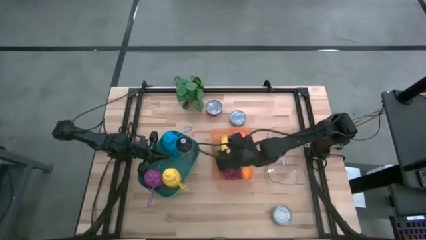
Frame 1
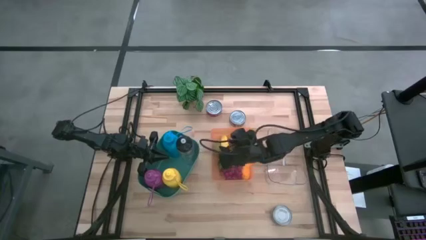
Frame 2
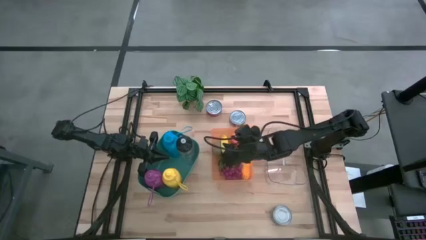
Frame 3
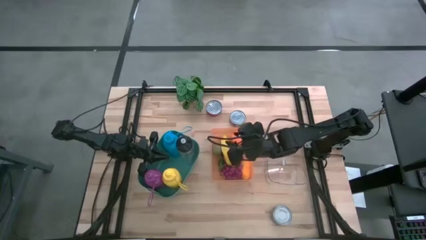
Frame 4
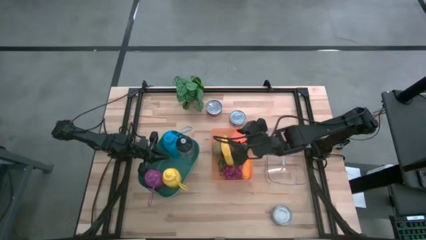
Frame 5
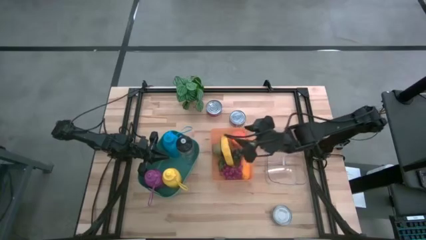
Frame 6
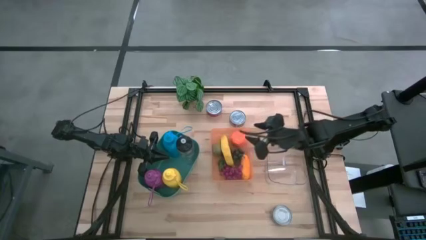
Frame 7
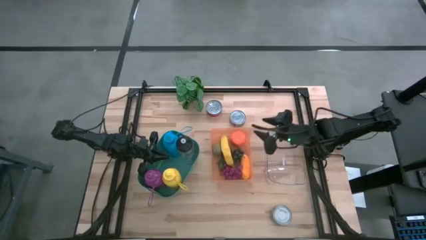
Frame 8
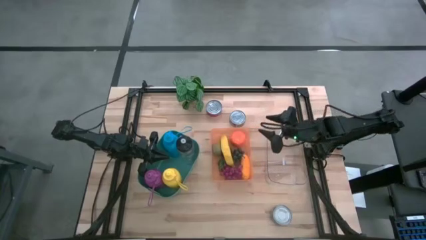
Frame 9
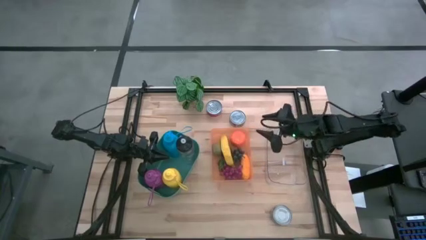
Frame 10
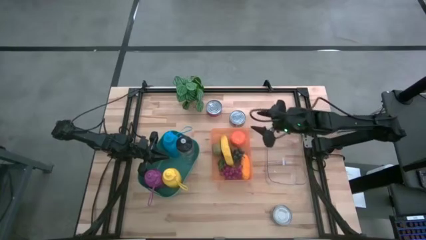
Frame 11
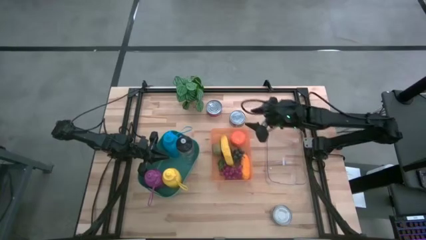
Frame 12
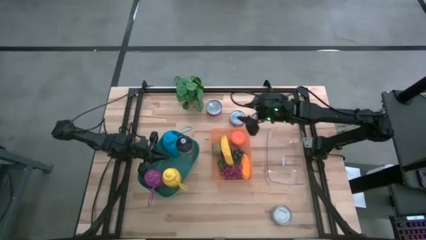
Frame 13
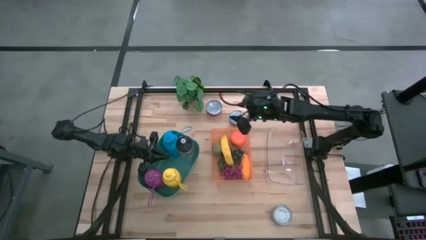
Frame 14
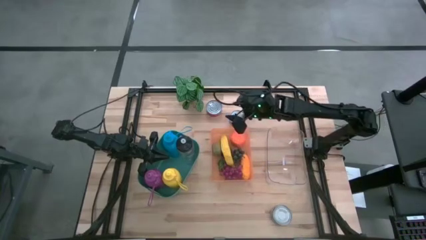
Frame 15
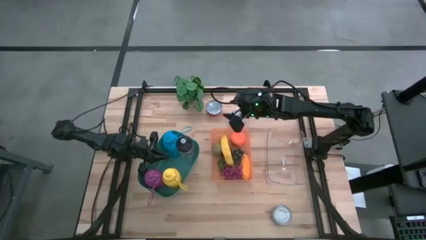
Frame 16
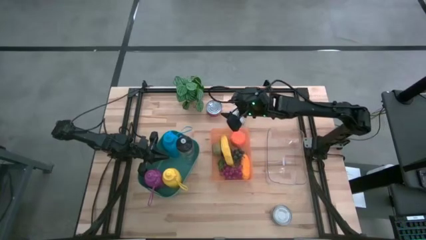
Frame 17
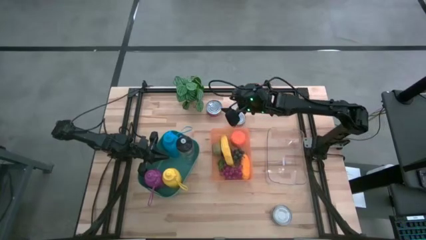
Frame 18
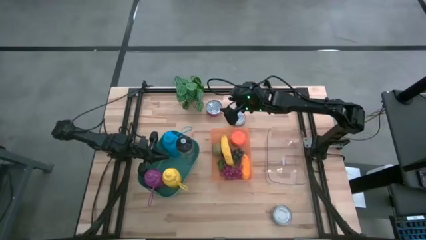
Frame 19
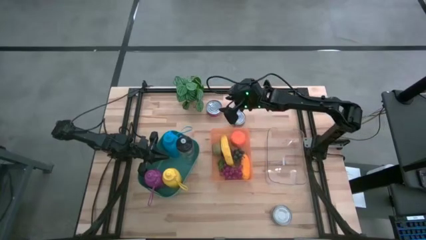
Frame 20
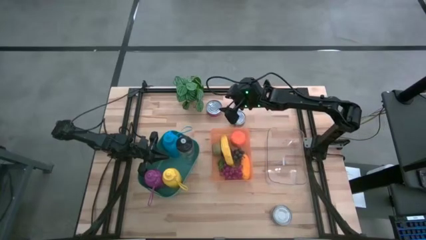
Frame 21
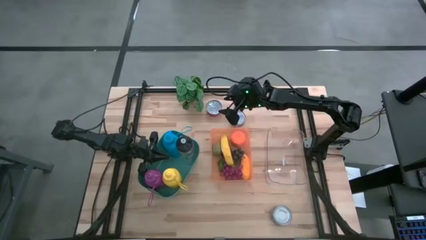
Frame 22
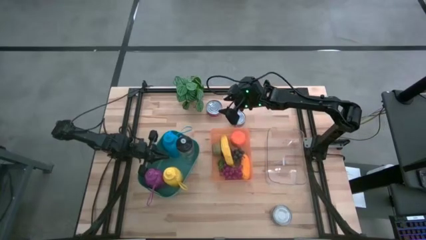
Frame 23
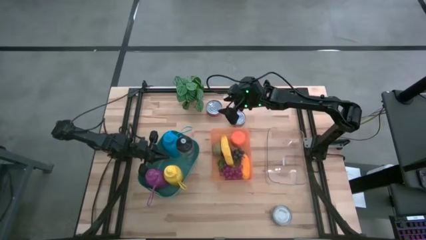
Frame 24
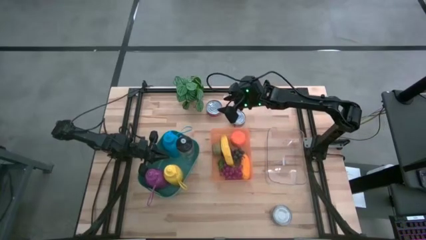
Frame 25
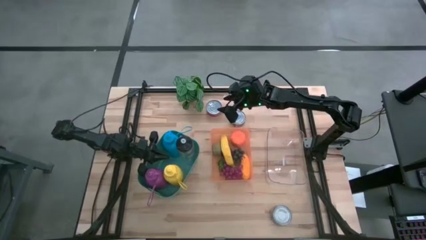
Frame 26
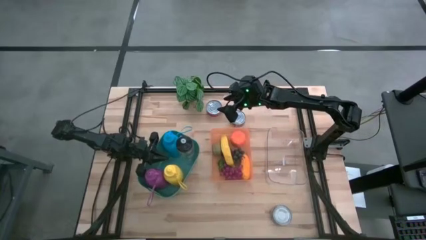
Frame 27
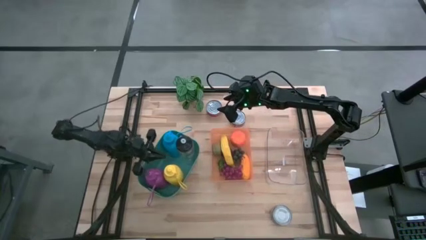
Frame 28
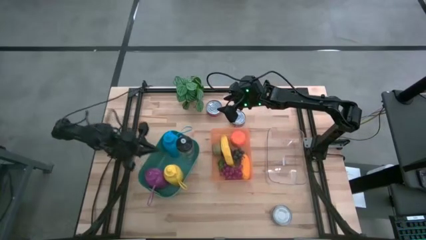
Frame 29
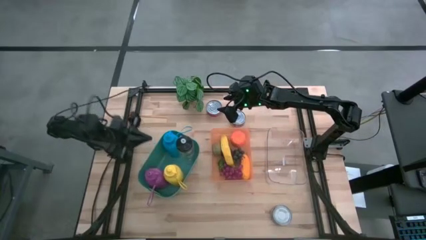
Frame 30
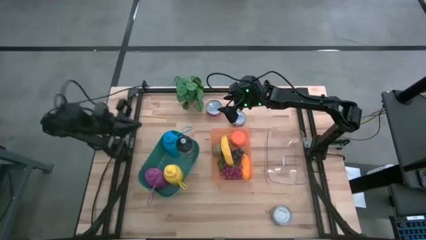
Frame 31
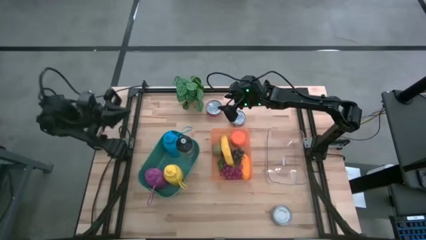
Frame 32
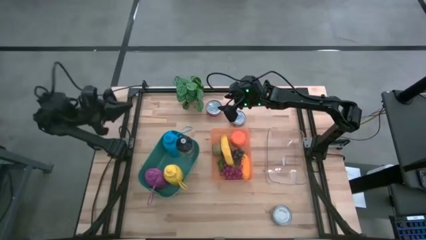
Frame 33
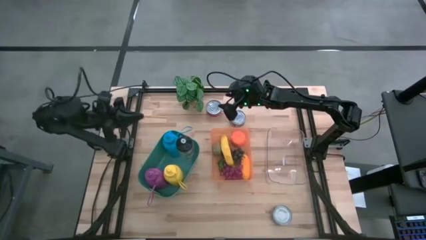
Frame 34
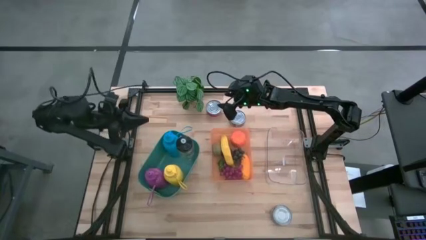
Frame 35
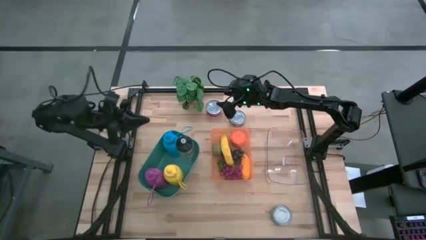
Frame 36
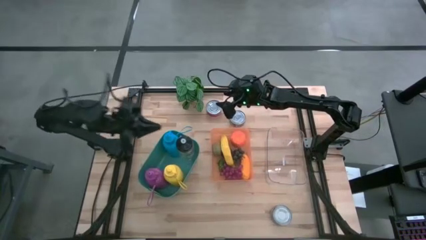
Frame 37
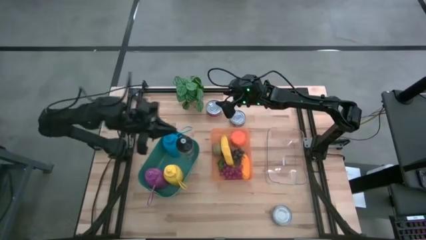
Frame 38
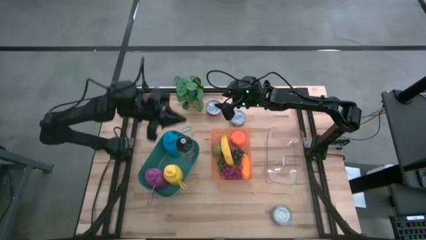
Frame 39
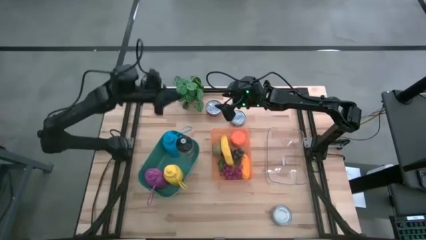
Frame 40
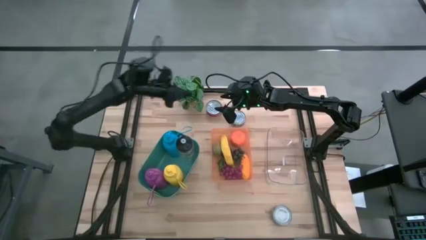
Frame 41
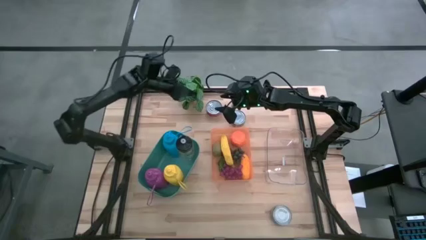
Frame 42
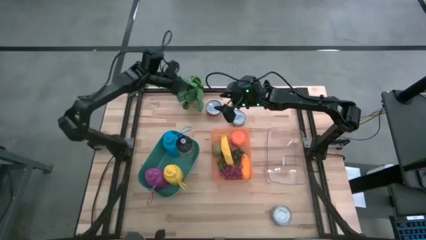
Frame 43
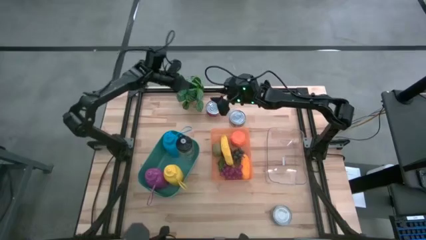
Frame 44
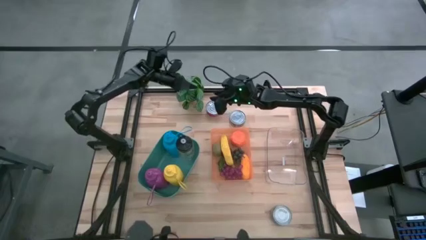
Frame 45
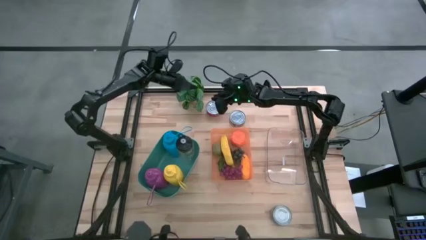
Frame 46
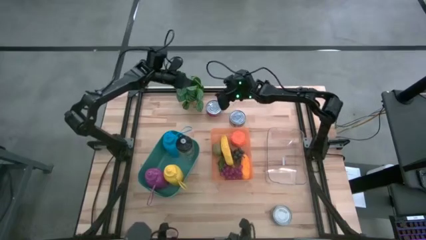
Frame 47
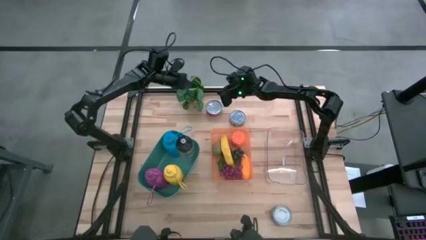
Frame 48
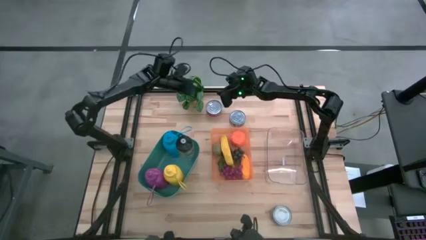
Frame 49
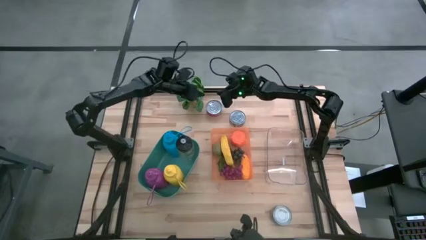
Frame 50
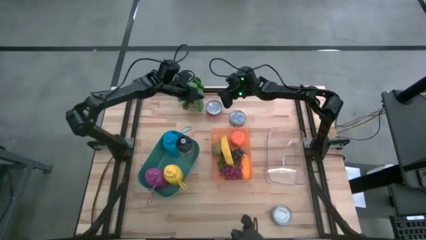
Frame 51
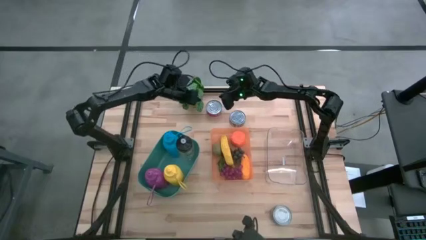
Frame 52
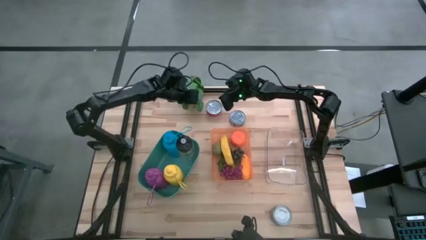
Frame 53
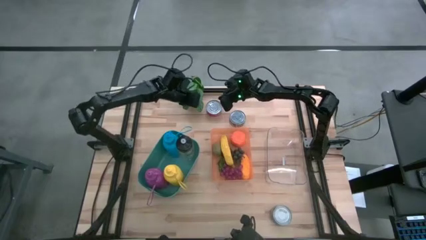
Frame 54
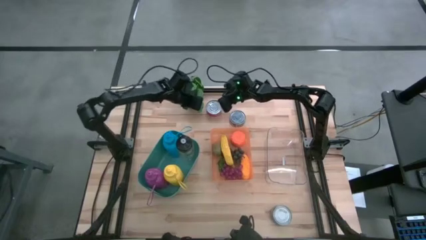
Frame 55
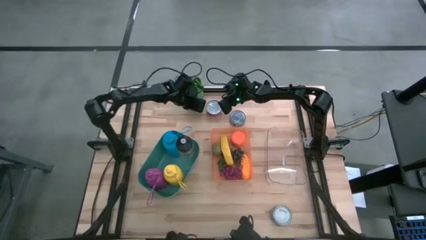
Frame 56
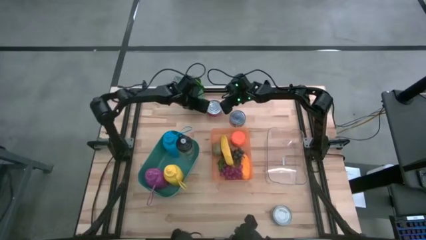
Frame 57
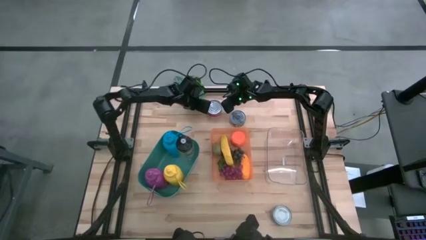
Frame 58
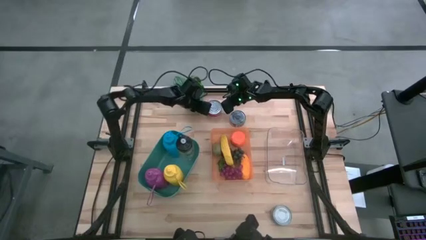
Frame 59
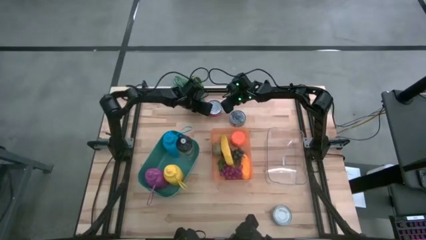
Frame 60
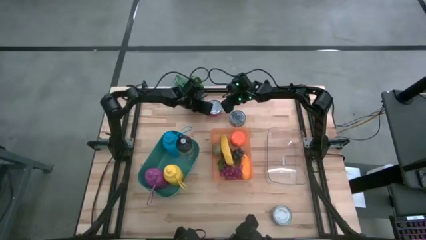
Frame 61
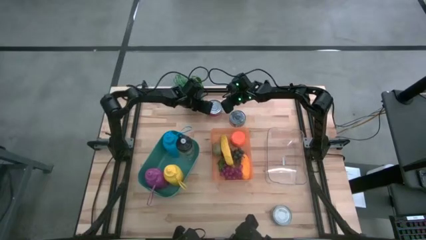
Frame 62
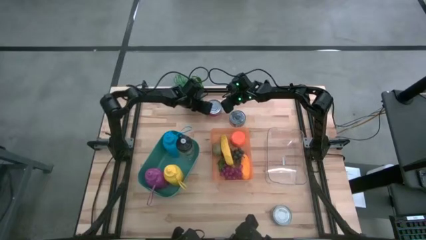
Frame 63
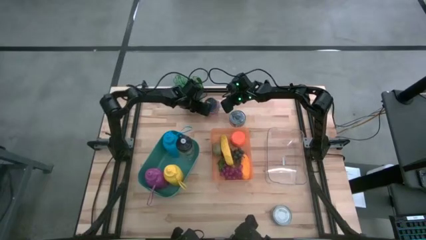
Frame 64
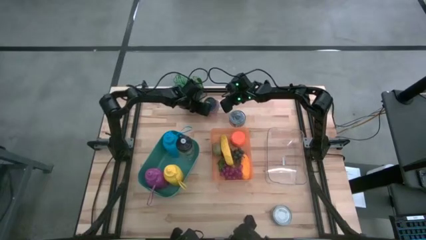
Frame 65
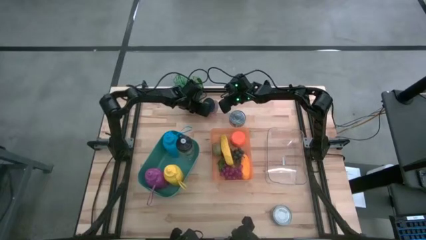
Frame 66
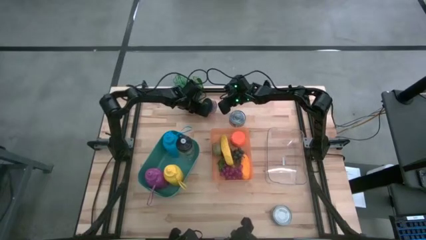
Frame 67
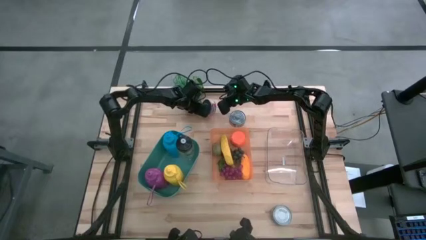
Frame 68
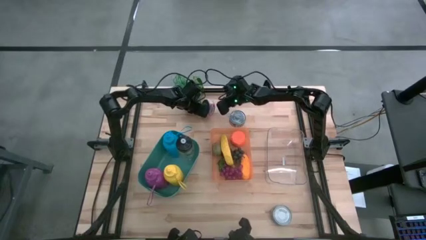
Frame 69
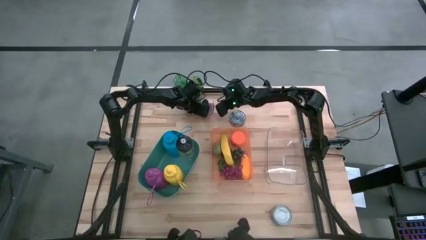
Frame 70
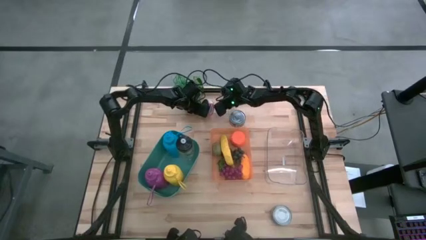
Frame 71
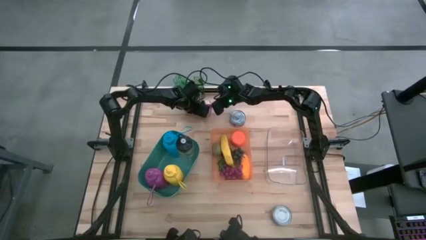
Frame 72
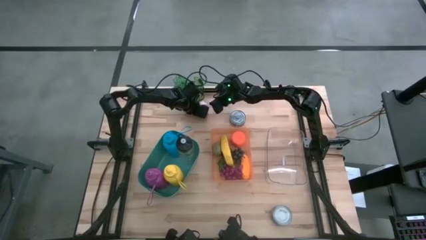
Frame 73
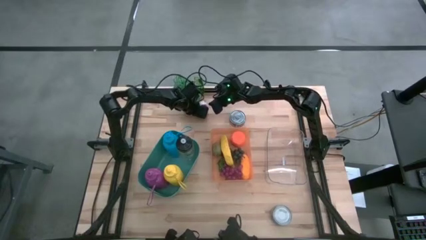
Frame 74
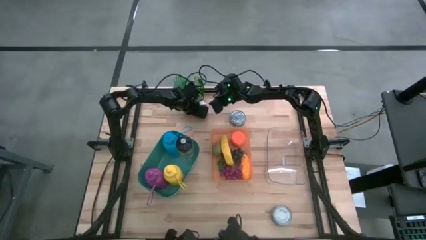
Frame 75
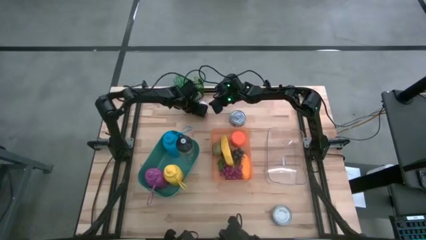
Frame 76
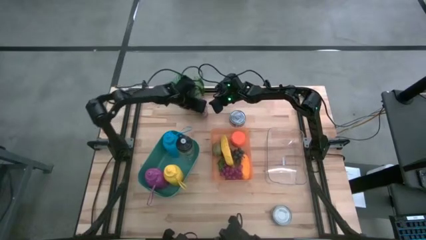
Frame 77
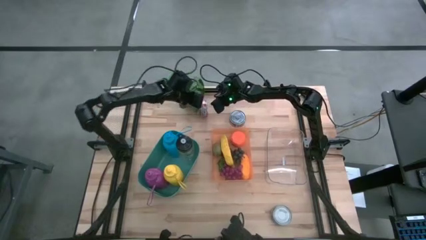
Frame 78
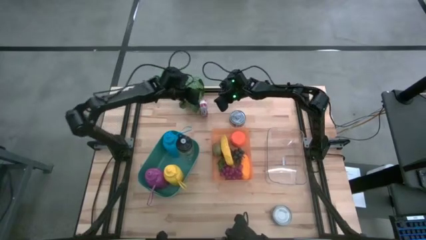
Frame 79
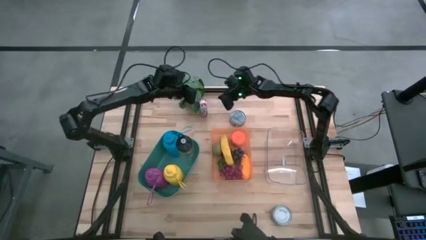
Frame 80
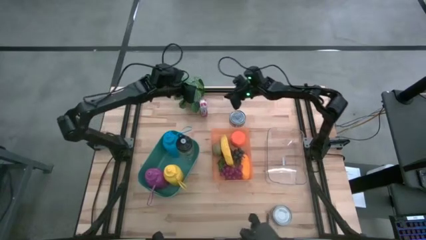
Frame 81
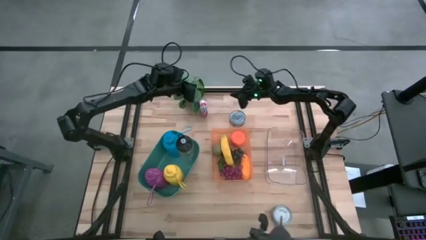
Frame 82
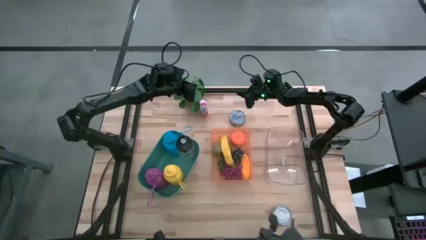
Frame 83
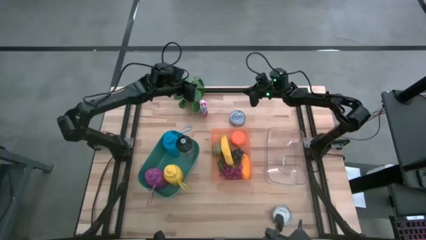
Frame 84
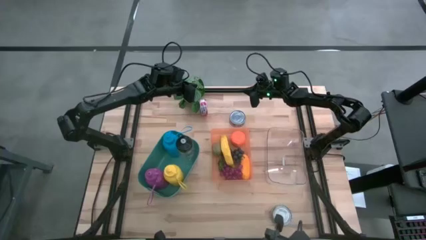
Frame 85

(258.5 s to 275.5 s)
Task: Pick & Place Food Item
Put the red tuna can into the transparent bin
